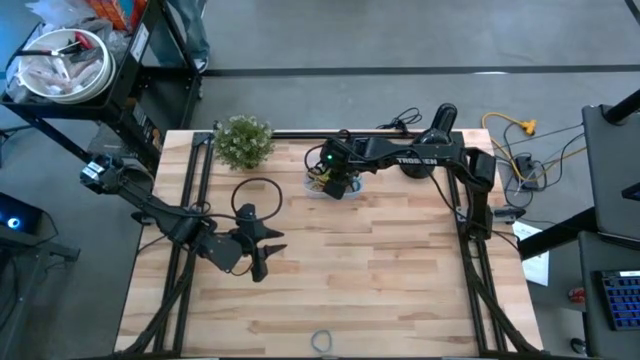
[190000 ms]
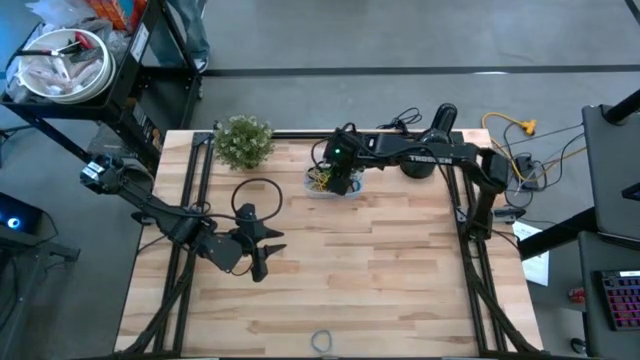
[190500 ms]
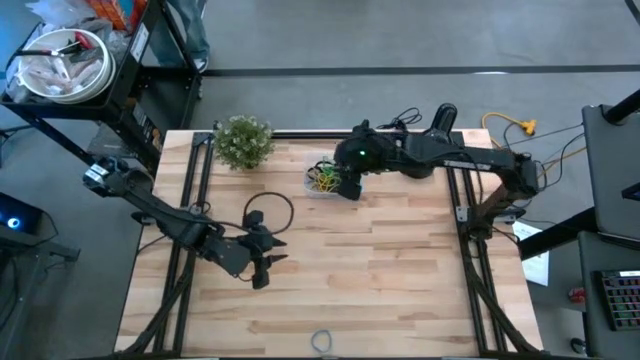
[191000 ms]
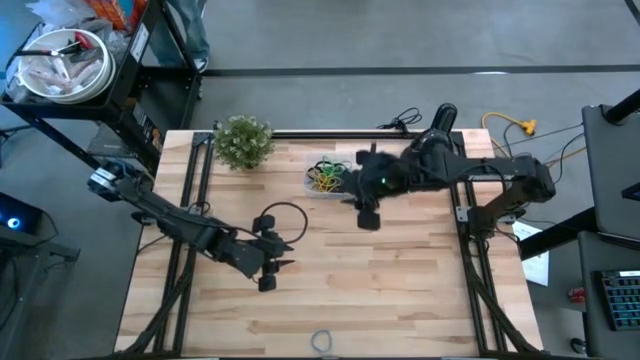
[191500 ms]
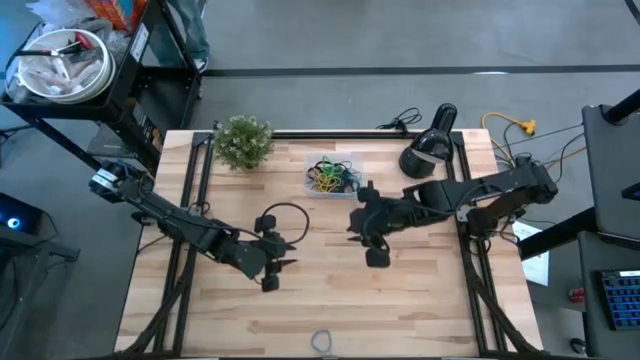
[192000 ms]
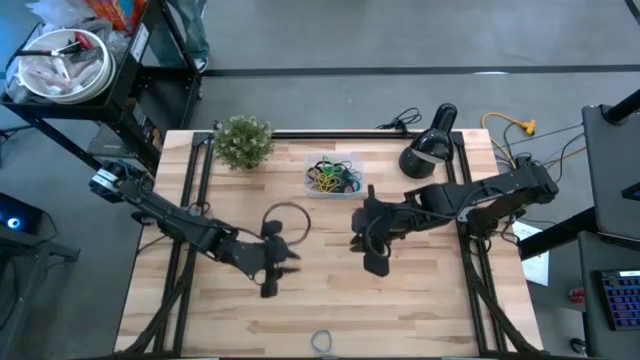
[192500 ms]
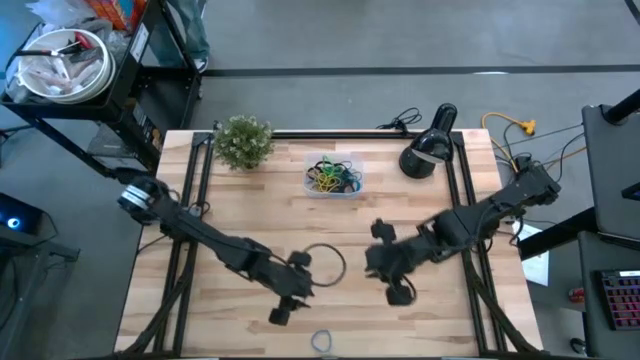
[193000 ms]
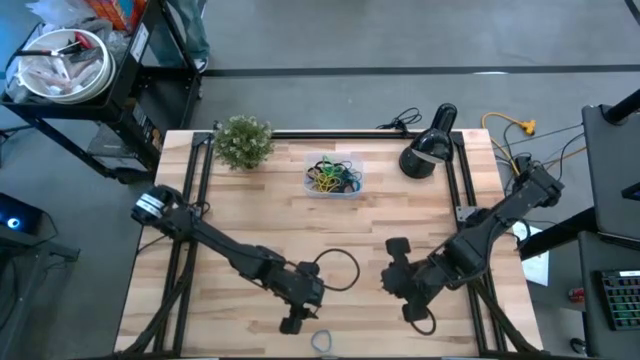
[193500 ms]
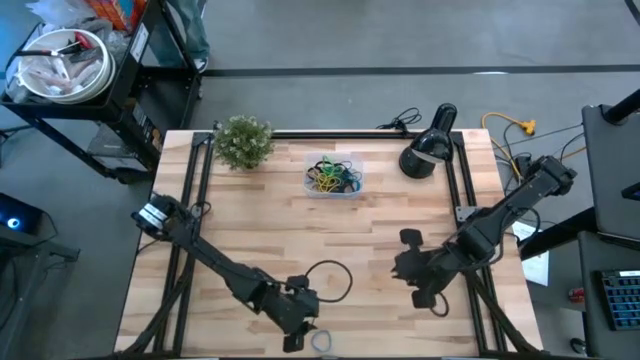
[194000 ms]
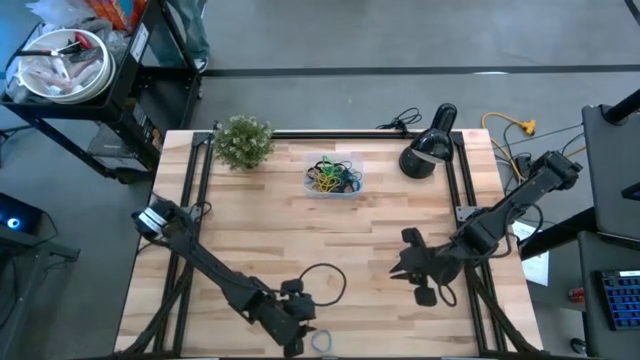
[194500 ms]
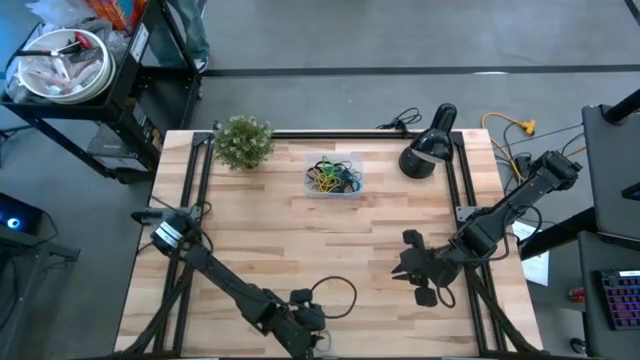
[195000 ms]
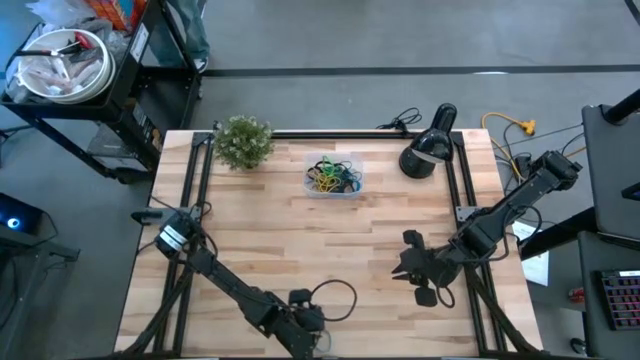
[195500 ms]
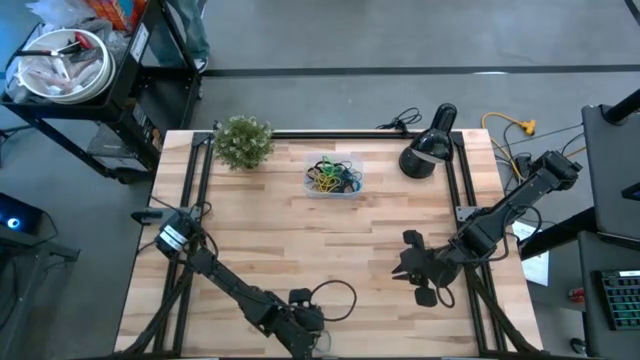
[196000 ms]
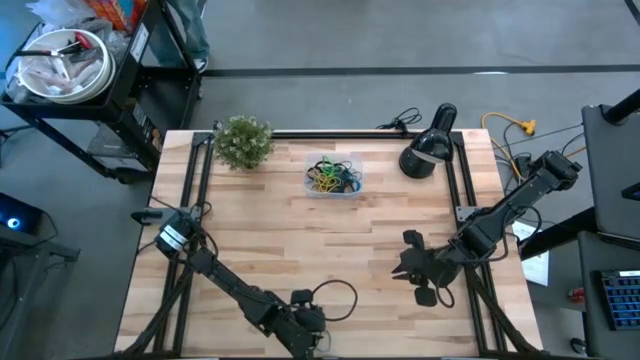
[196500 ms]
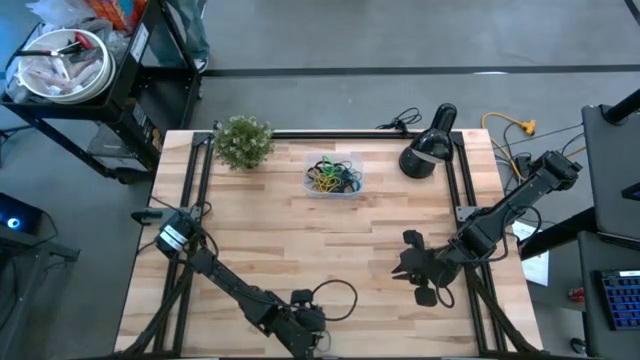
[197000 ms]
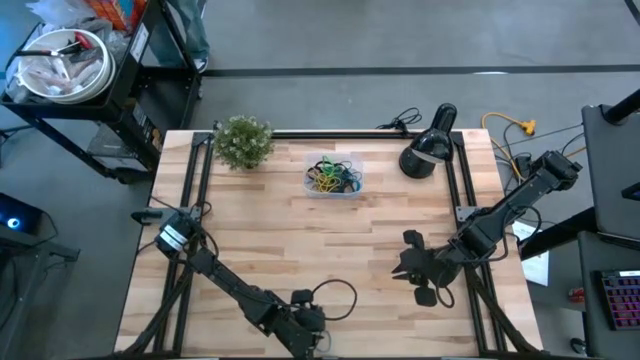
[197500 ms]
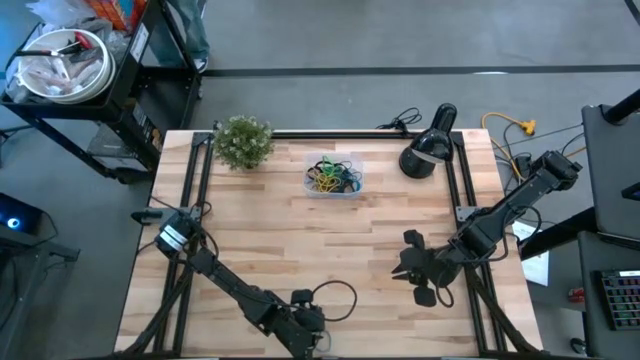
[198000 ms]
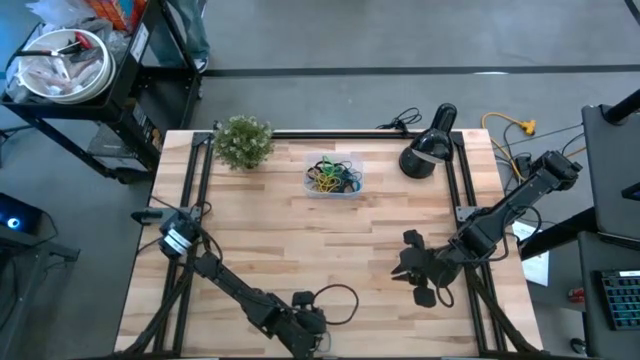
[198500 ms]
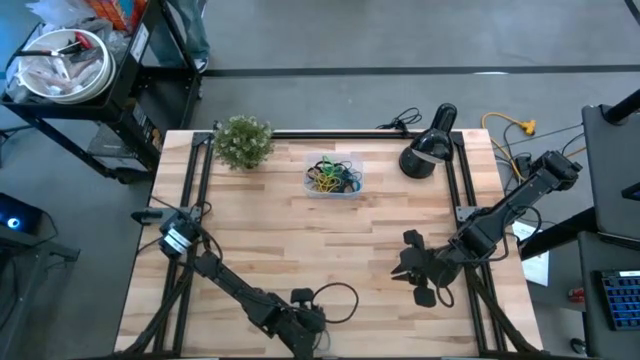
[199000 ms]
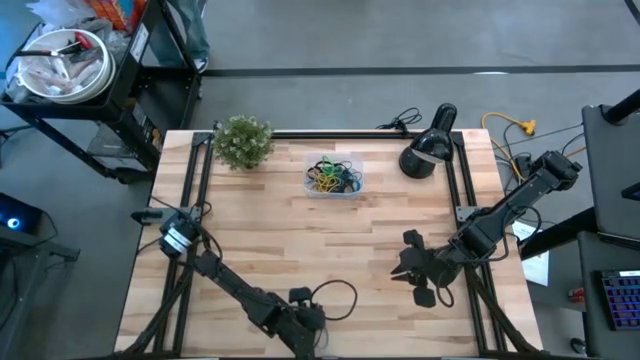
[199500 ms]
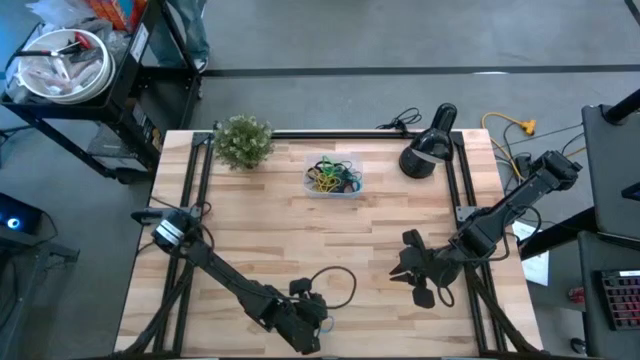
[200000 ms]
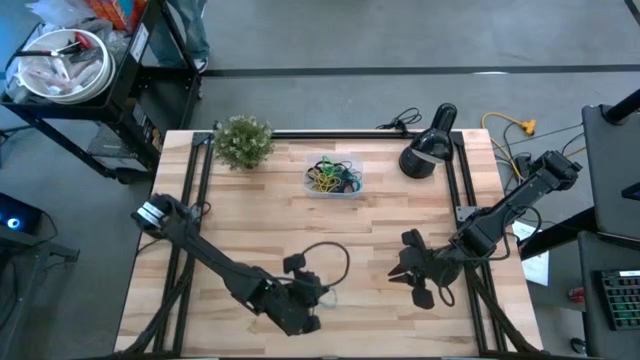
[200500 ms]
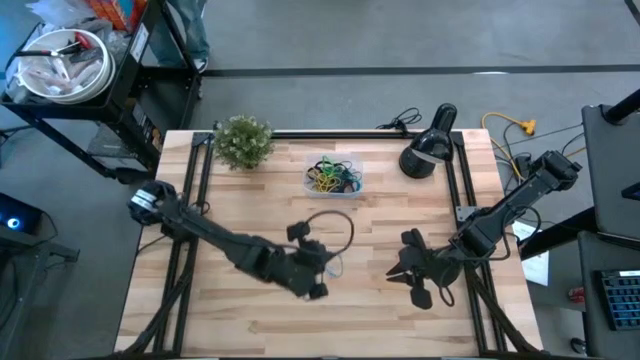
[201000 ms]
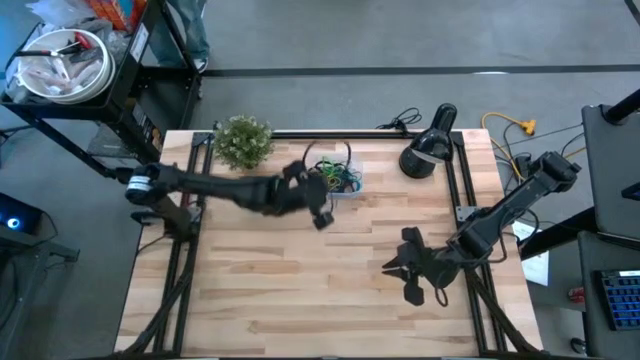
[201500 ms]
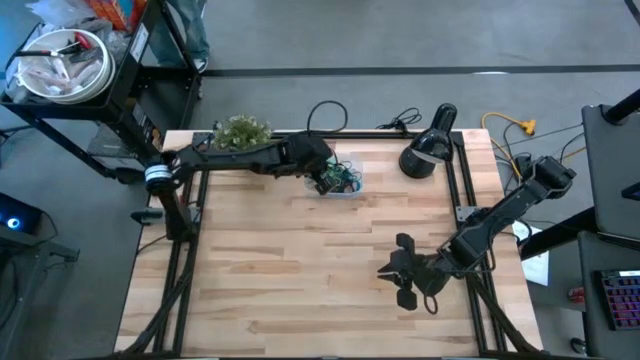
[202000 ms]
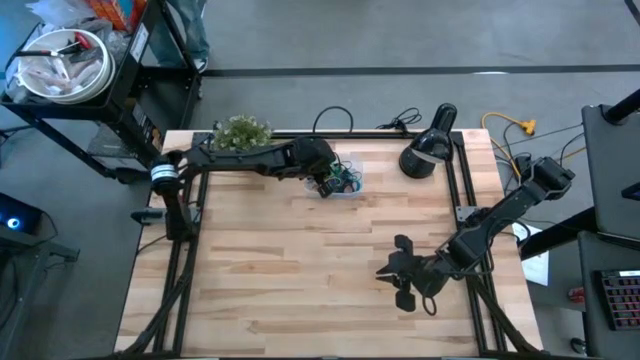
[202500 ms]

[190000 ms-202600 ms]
Task: Pick and place rubber bands into bin
Put the blue rubberband into the transparent bin

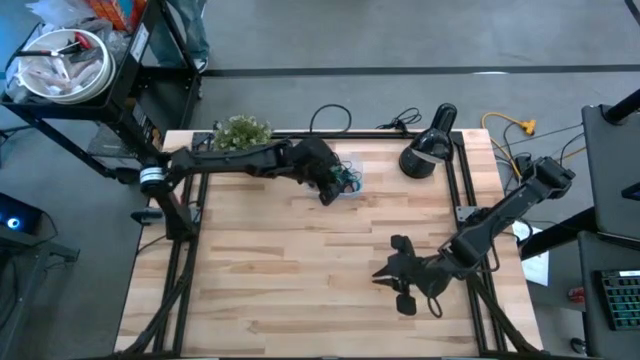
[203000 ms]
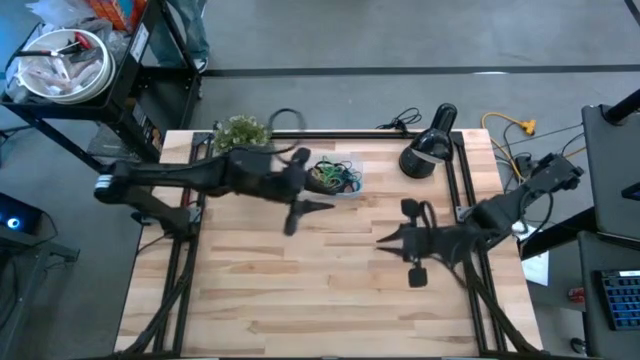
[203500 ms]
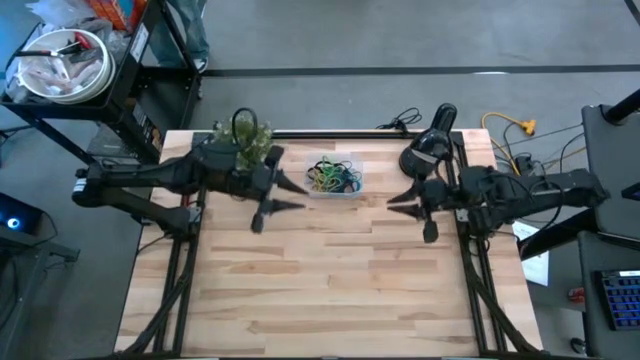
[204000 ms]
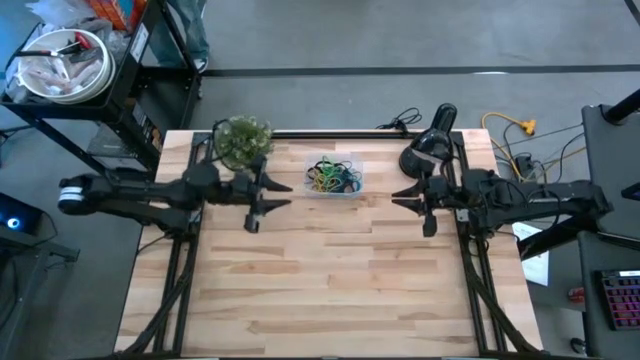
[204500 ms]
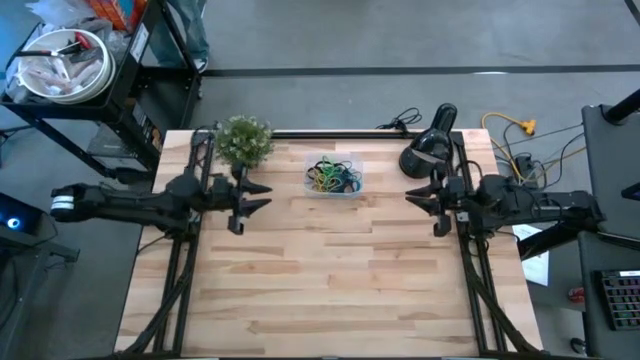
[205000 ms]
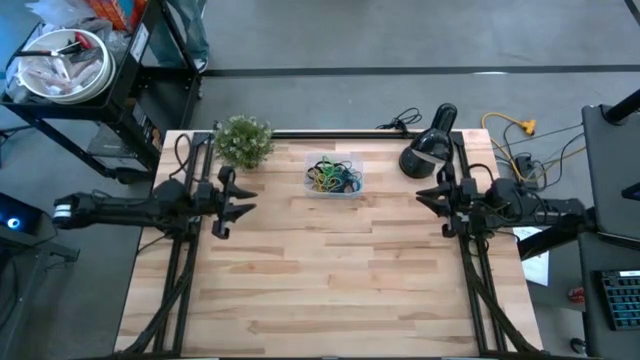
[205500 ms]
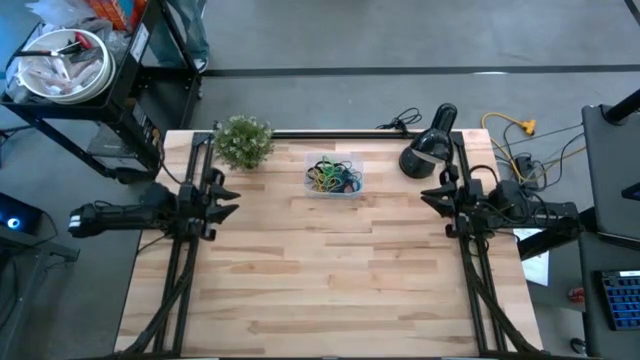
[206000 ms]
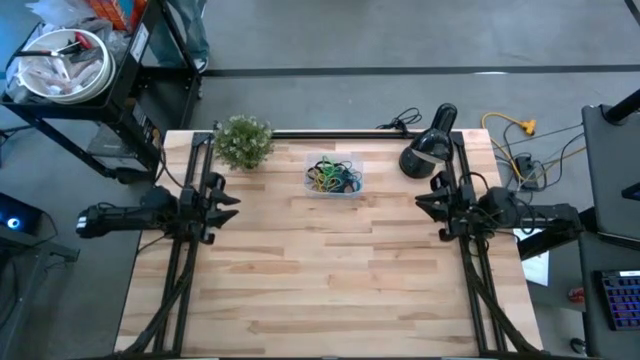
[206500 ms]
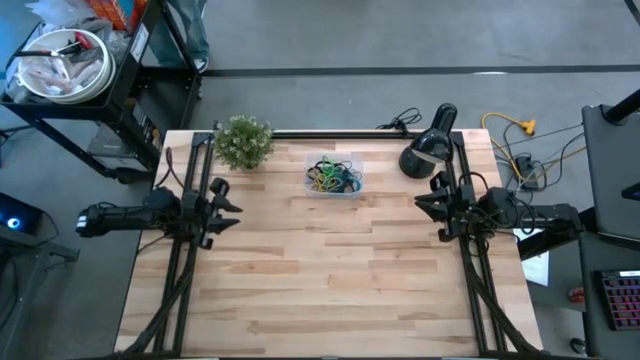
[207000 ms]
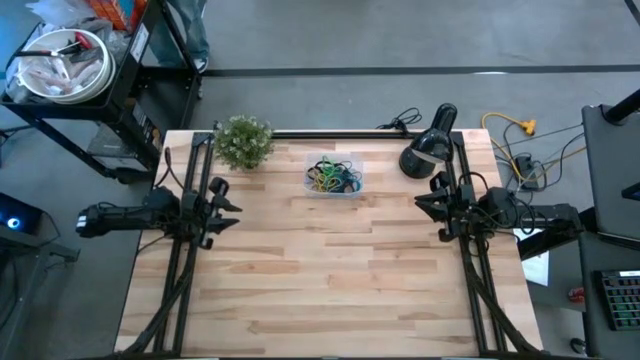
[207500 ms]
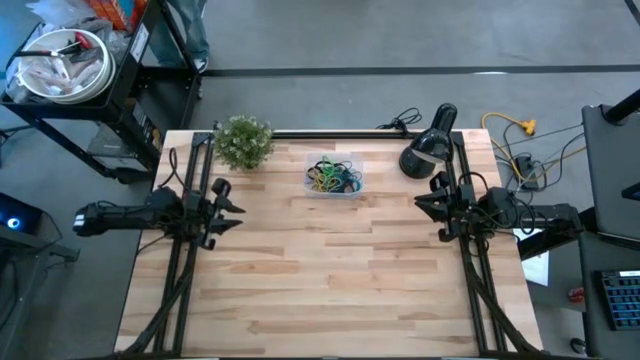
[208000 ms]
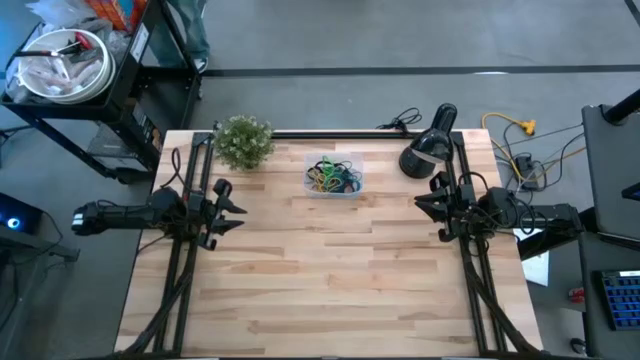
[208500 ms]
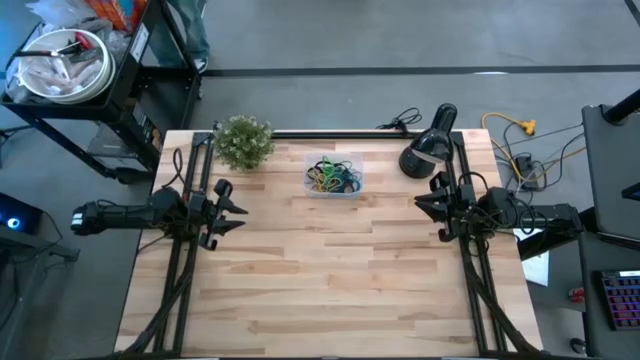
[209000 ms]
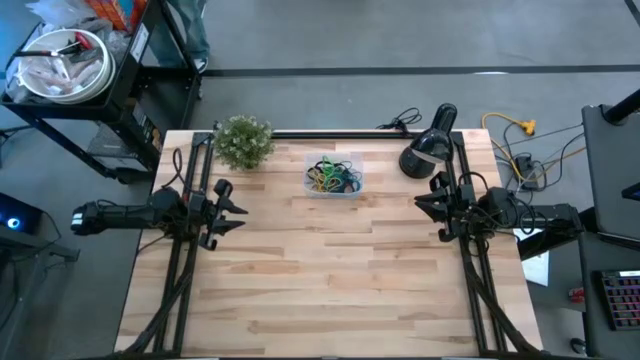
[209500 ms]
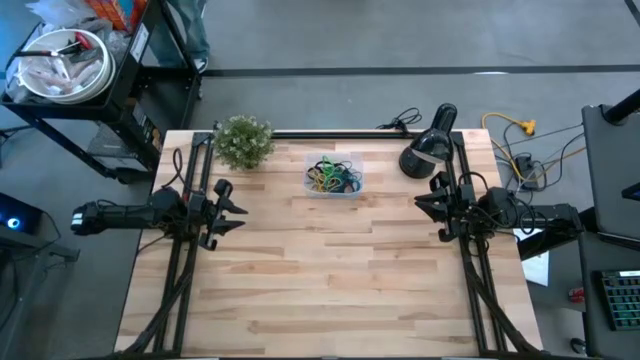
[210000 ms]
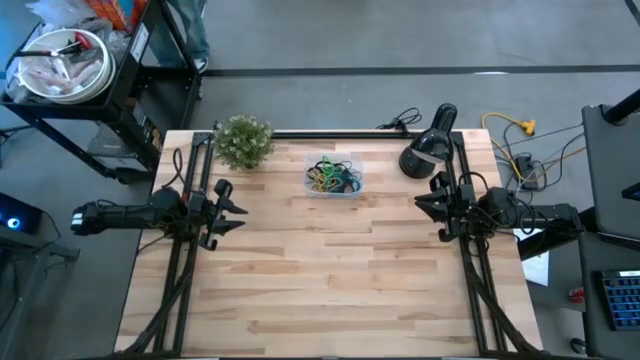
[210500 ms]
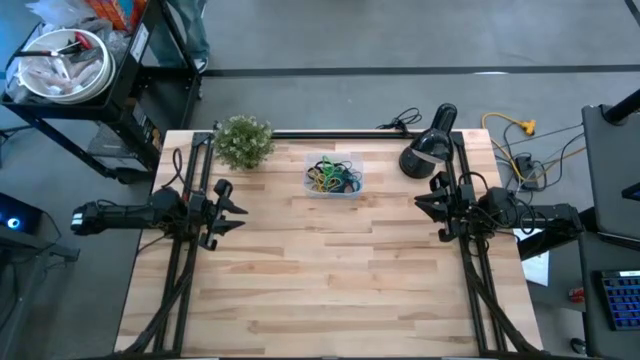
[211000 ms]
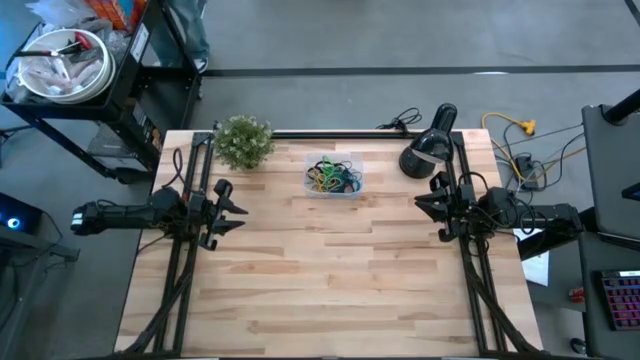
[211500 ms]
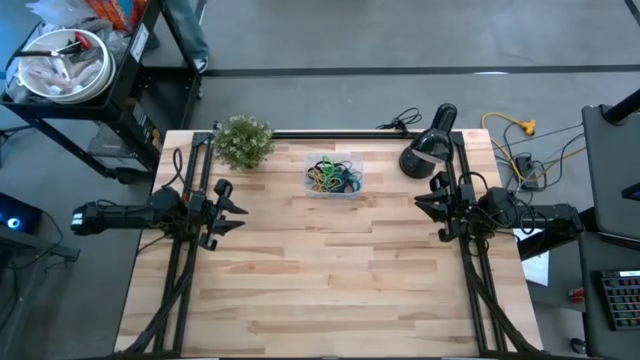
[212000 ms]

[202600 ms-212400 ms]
Return to Home Position
